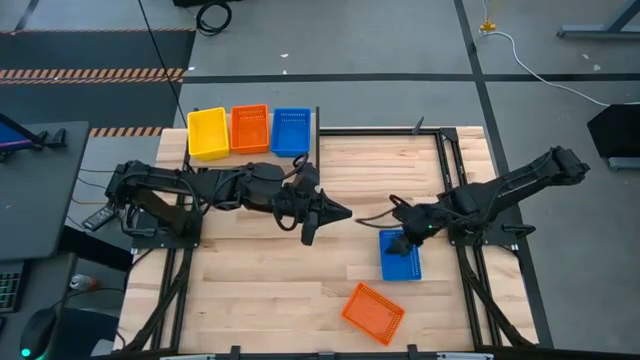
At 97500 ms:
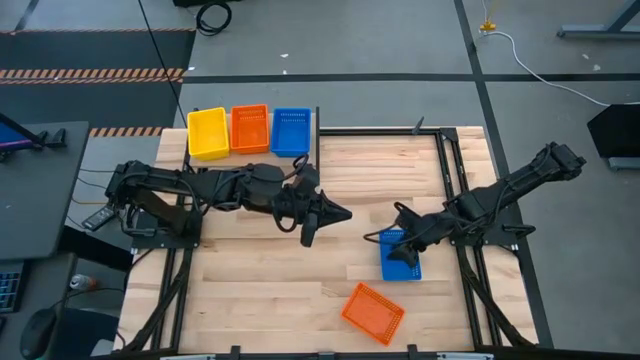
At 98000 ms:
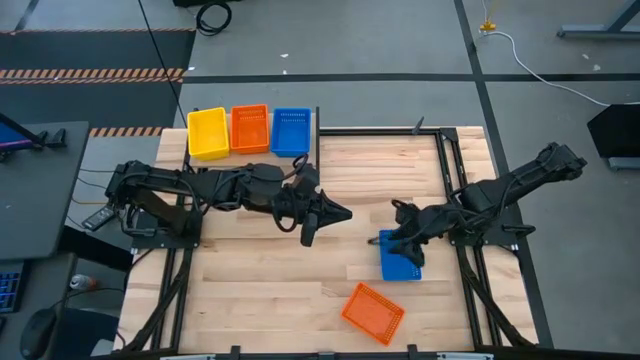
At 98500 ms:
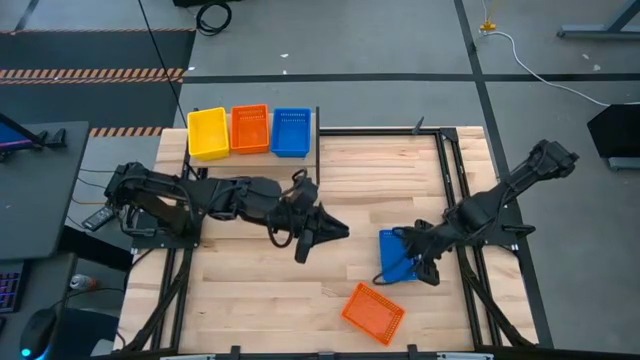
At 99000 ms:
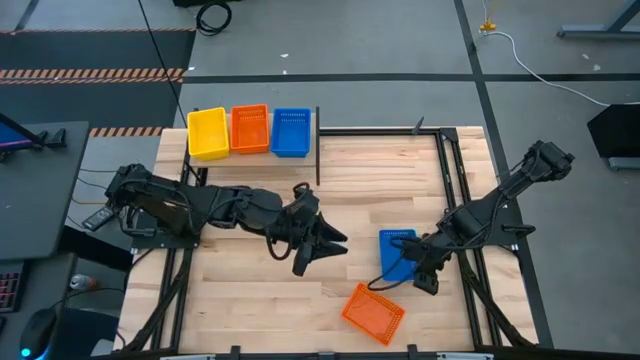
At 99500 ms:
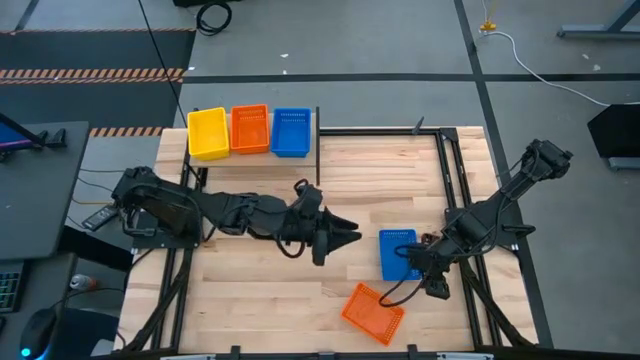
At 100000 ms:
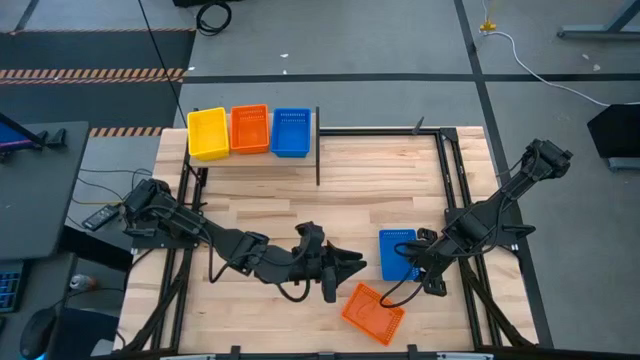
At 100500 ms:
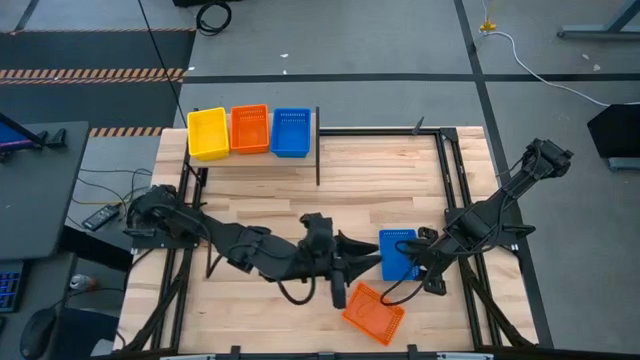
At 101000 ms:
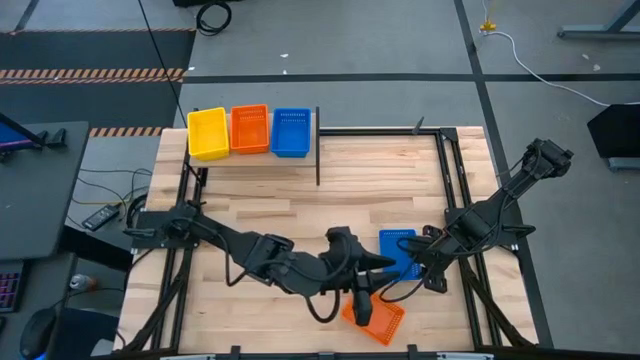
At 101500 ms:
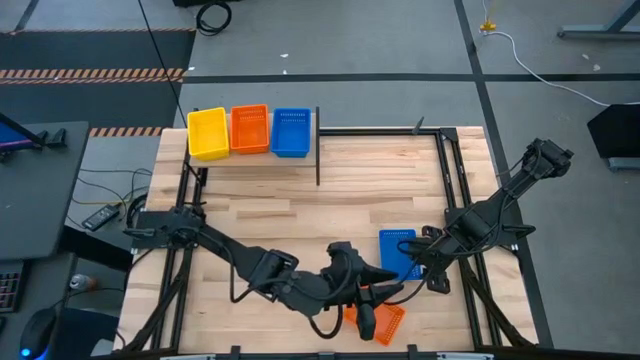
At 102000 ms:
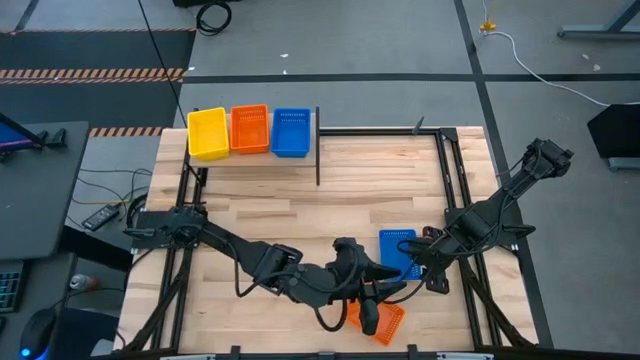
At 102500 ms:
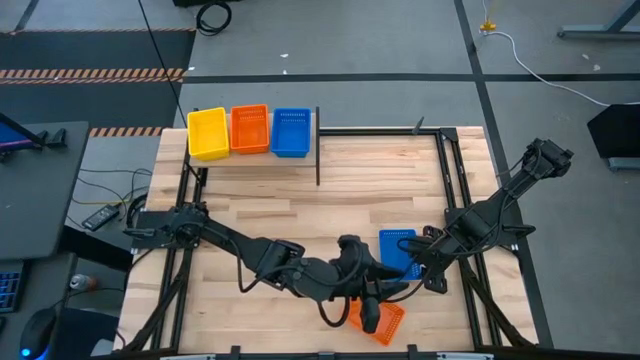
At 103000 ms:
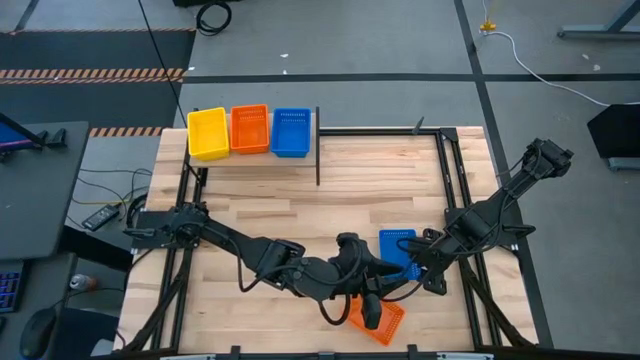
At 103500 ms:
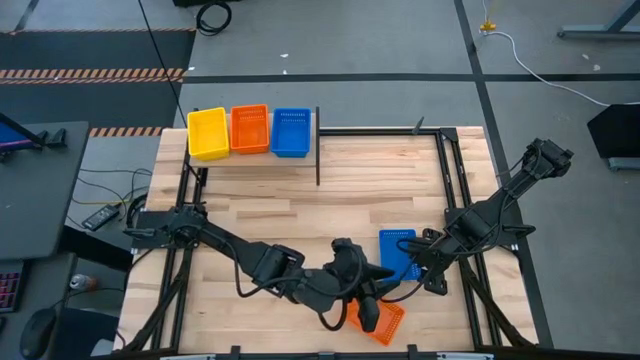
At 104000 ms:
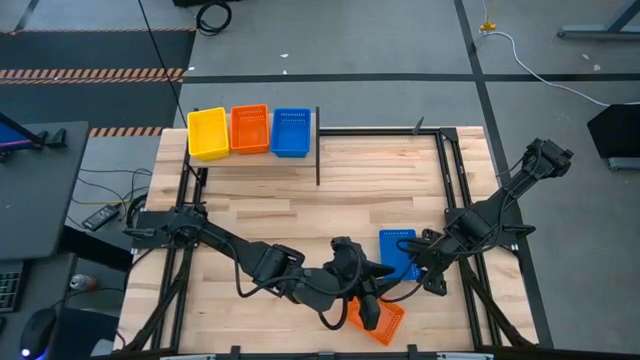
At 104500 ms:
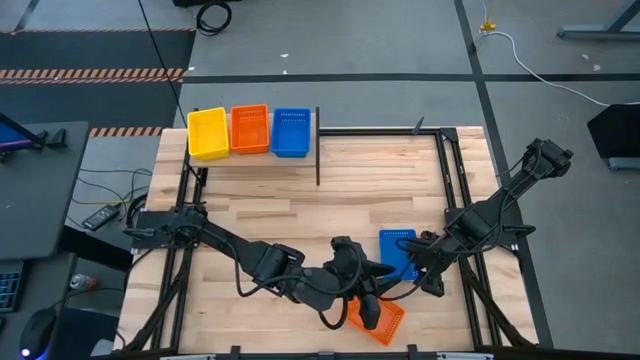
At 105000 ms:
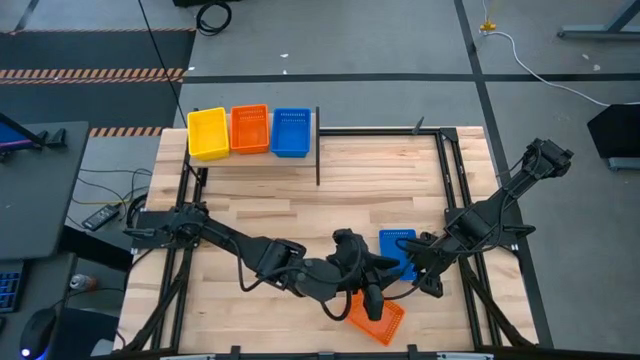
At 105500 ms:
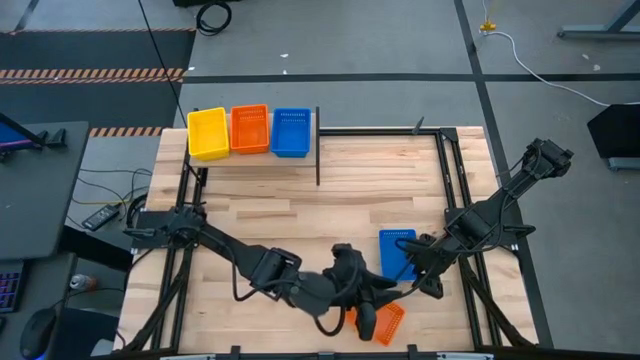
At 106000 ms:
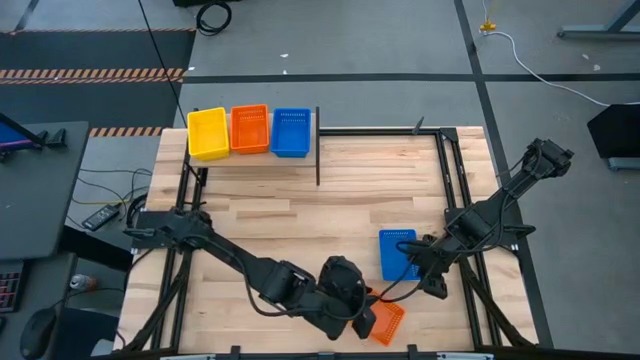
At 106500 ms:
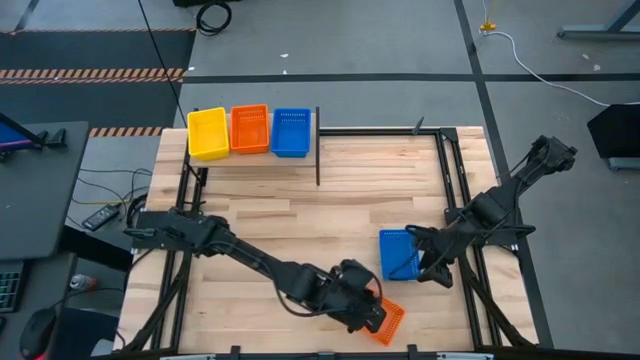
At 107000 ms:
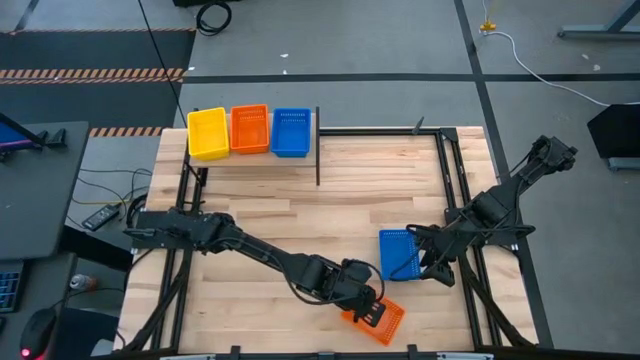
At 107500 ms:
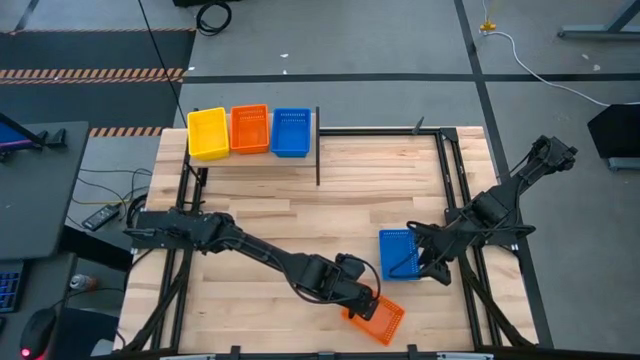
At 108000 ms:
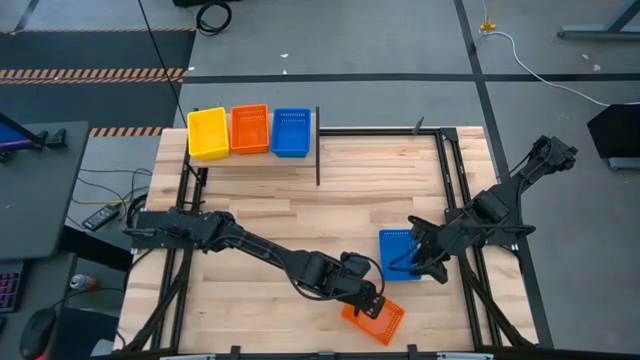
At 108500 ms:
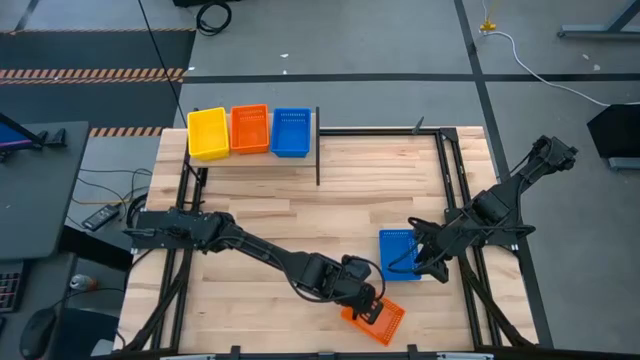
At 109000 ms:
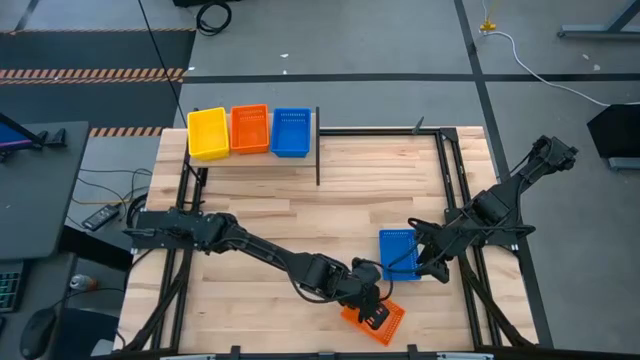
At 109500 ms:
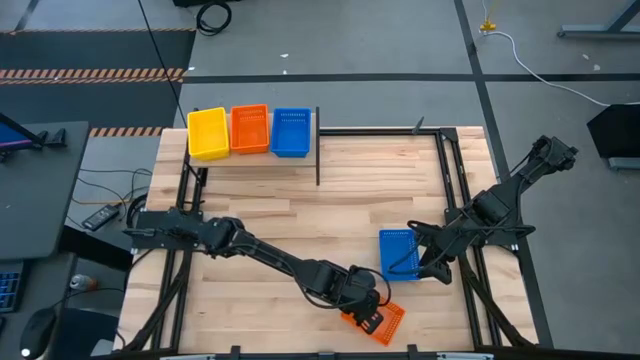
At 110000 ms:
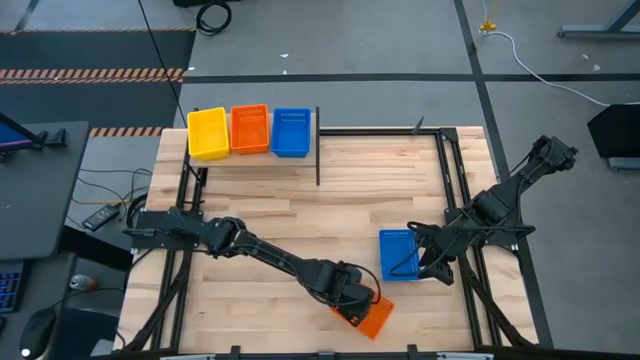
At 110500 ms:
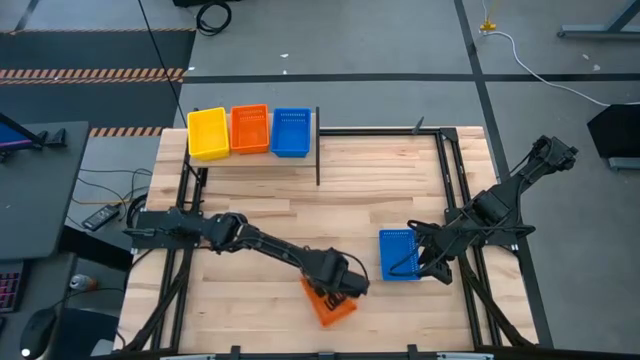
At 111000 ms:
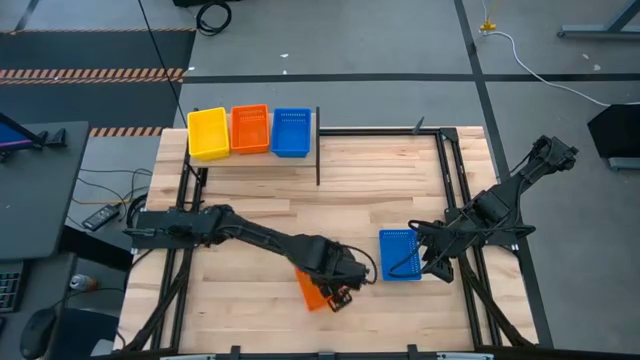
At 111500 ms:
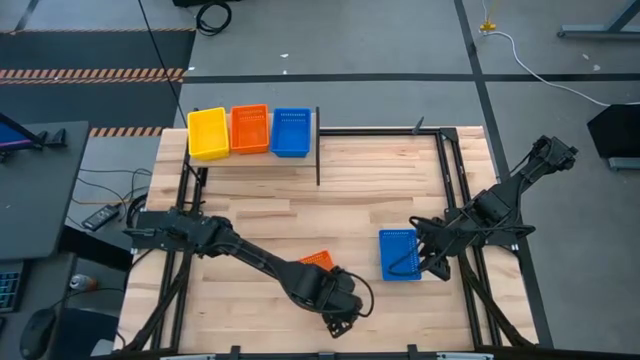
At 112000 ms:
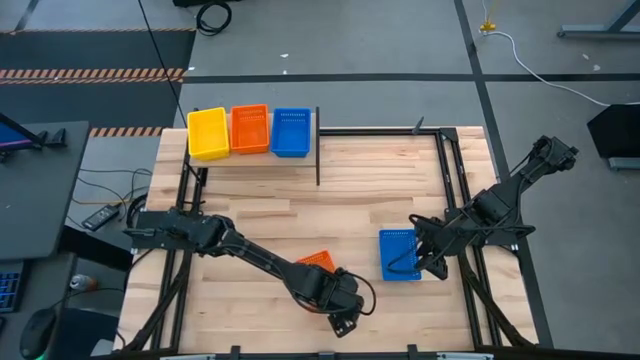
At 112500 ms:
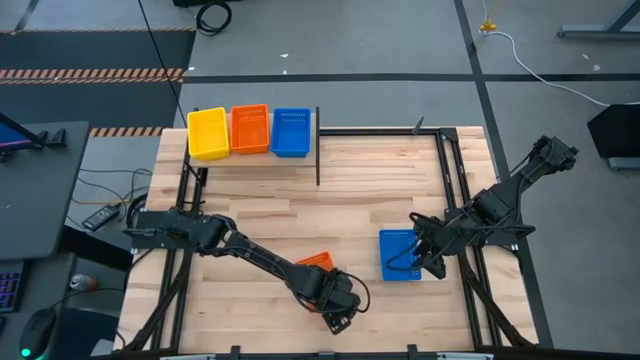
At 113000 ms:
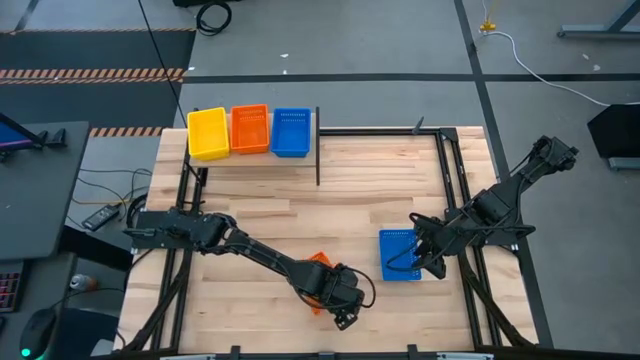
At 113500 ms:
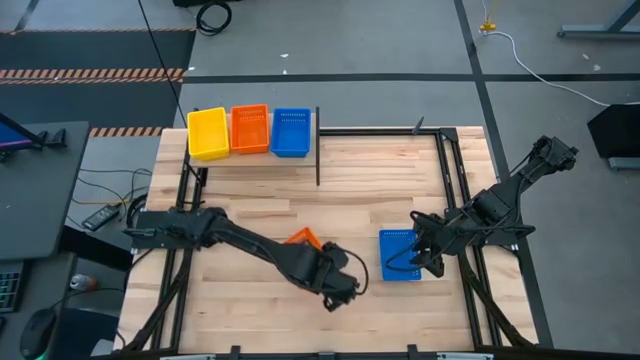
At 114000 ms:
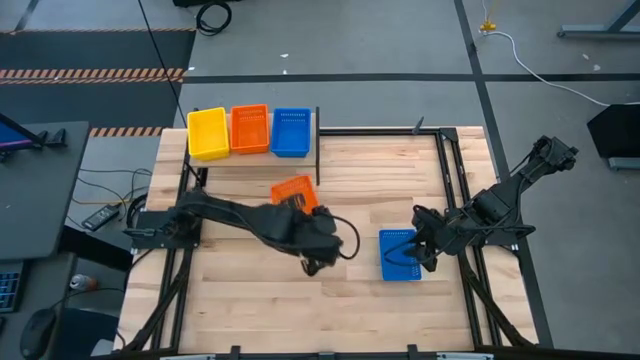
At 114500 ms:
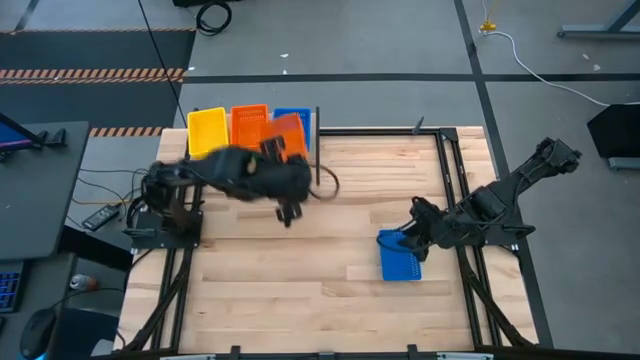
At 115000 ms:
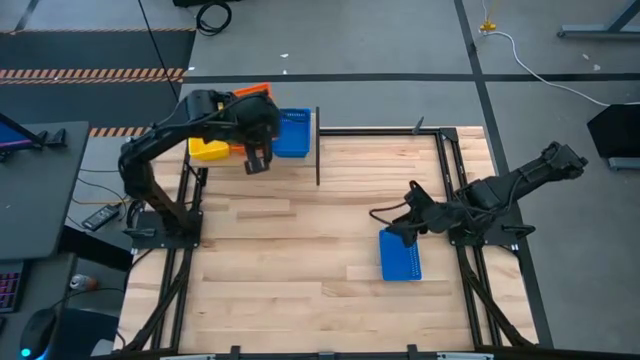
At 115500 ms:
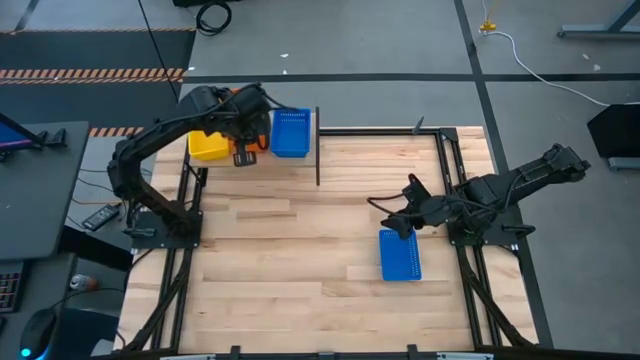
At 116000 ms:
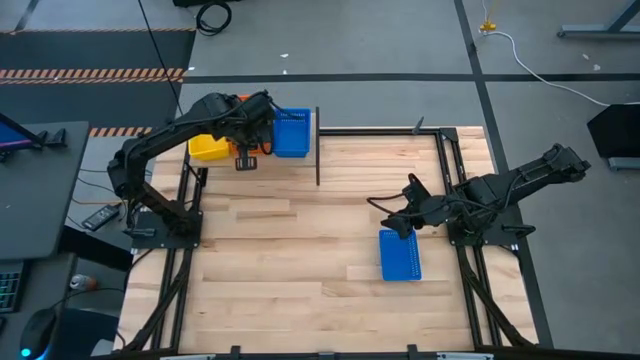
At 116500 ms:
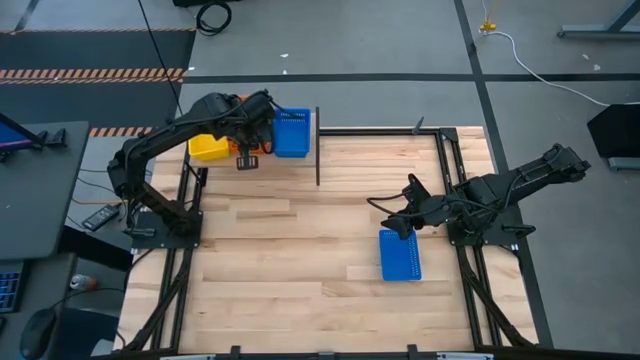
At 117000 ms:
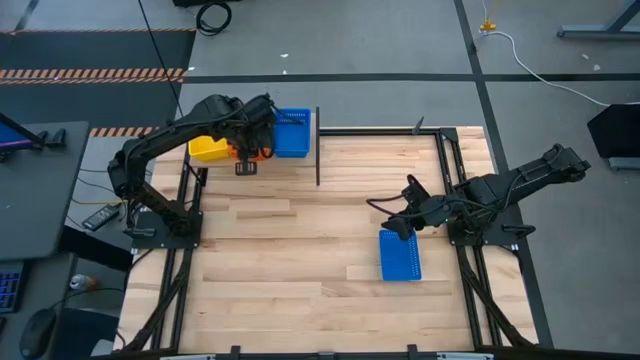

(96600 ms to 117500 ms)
Task: Stack baskets on shelf by color
Stack the orange bin on top of the orange bin on the shelf

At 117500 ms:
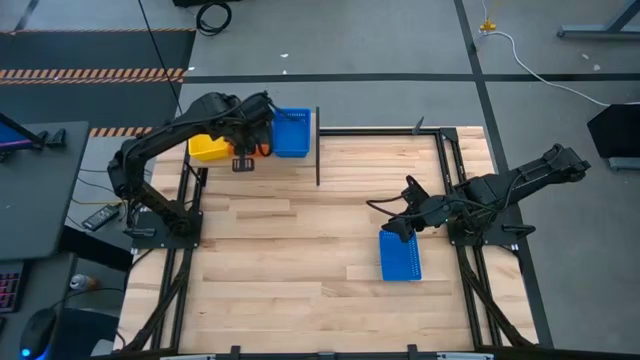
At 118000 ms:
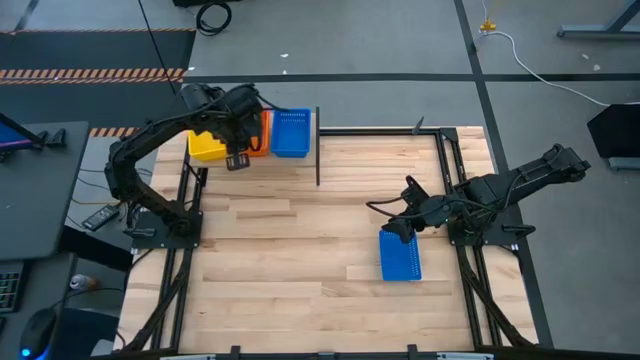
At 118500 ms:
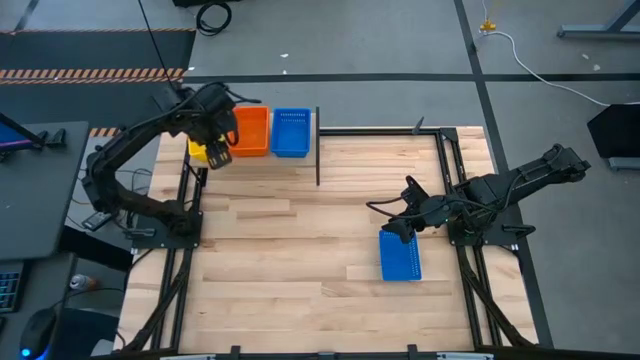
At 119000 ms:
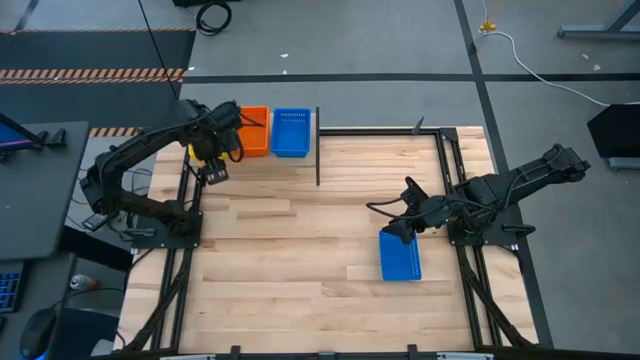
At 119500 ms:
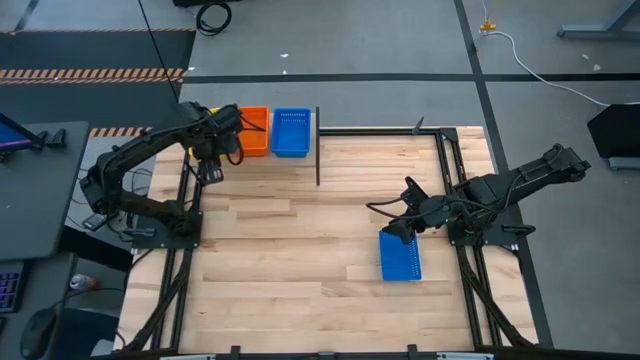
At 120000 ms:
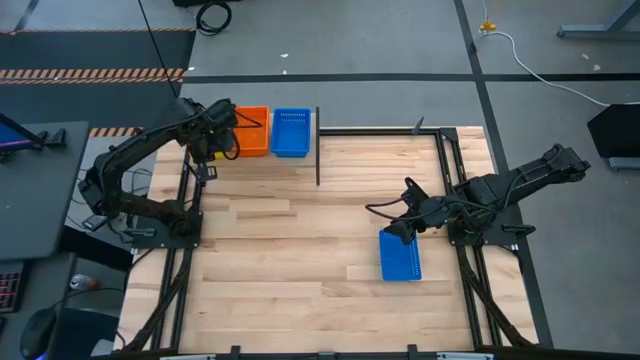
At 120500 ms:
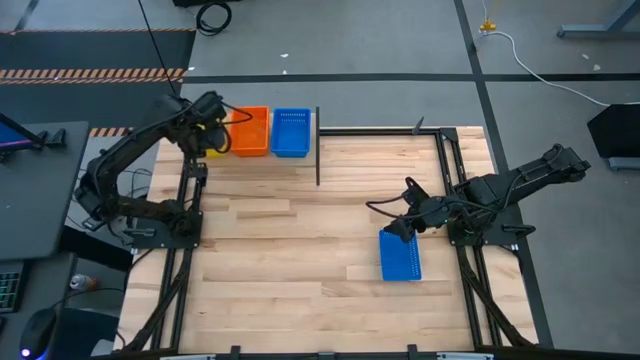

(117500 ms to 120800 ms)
Adjust the yellow bin
